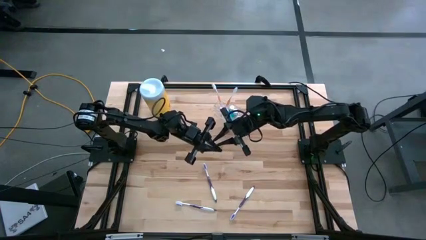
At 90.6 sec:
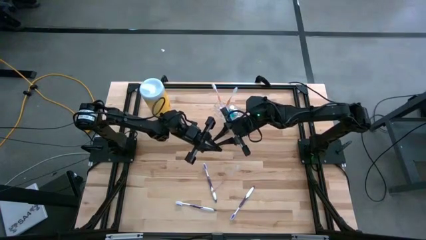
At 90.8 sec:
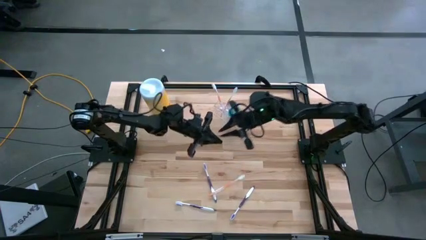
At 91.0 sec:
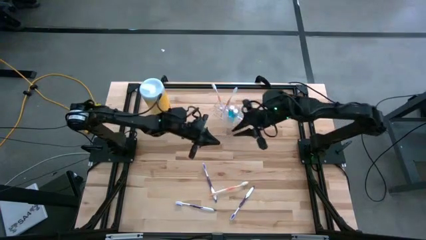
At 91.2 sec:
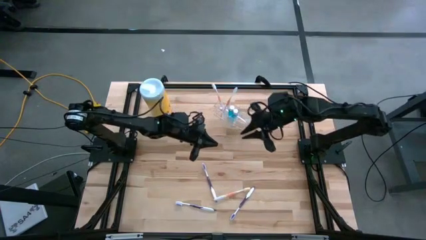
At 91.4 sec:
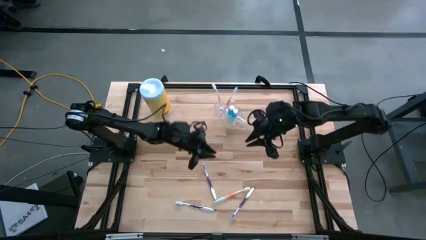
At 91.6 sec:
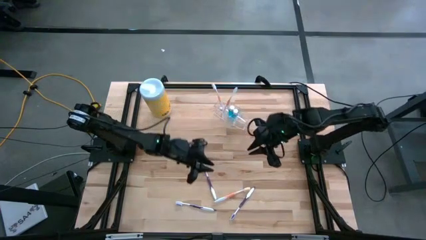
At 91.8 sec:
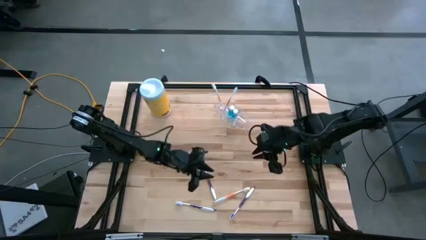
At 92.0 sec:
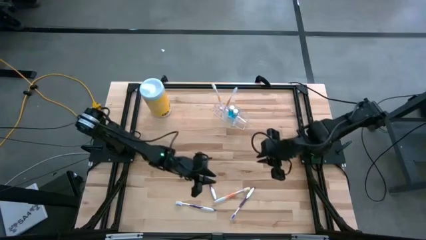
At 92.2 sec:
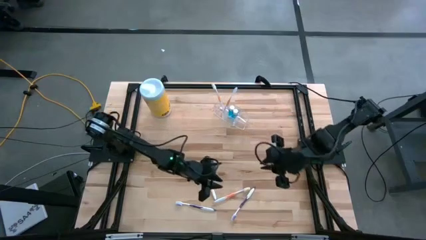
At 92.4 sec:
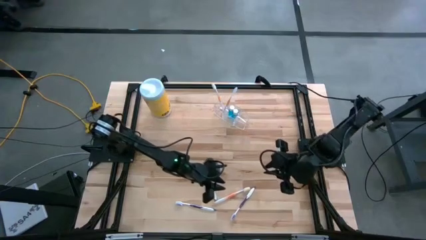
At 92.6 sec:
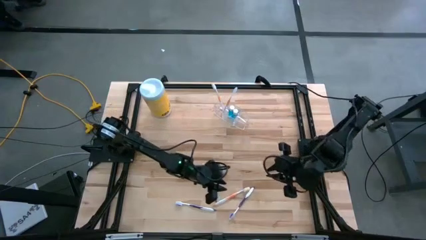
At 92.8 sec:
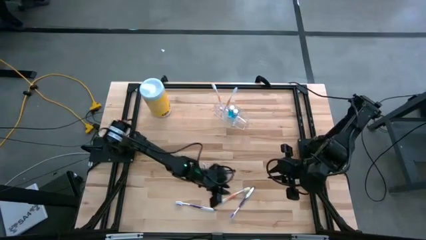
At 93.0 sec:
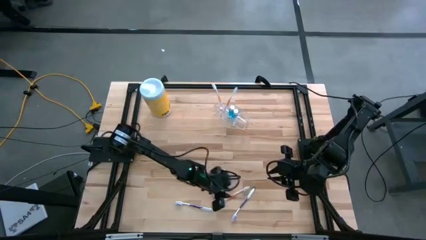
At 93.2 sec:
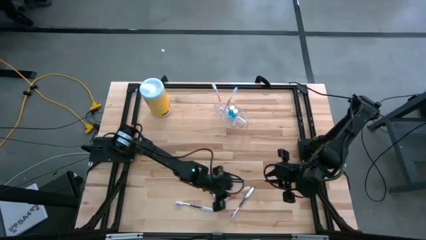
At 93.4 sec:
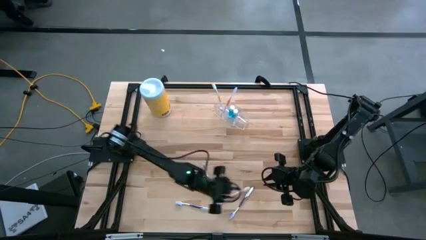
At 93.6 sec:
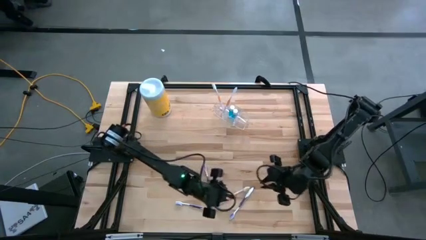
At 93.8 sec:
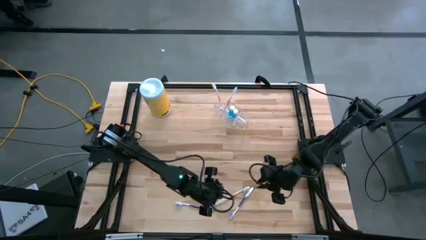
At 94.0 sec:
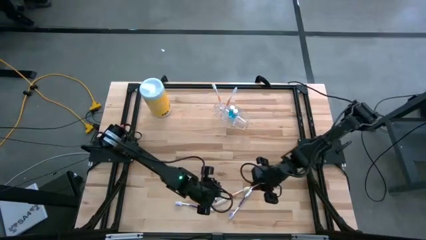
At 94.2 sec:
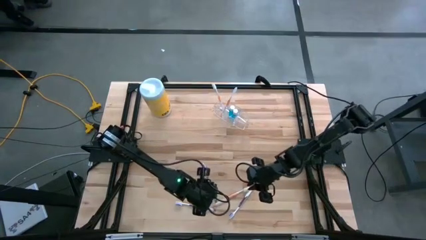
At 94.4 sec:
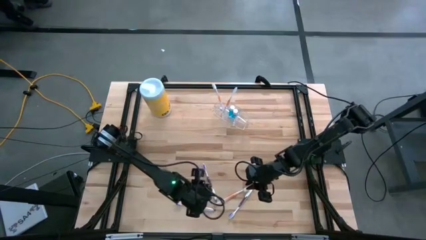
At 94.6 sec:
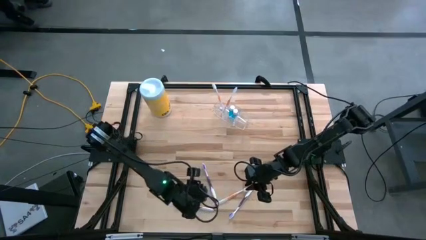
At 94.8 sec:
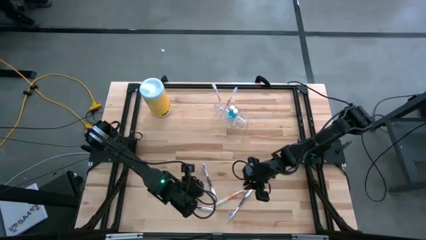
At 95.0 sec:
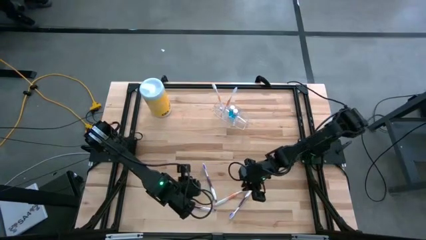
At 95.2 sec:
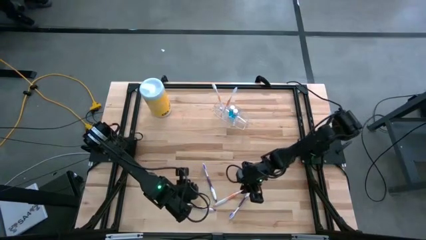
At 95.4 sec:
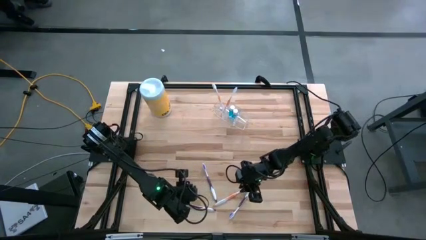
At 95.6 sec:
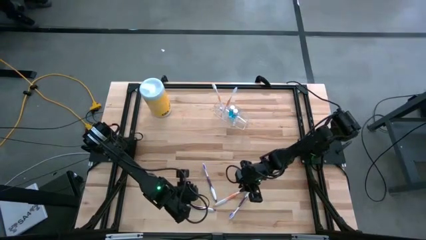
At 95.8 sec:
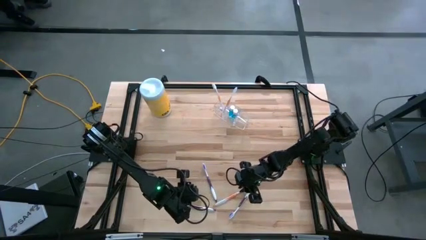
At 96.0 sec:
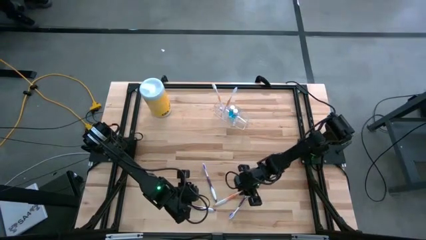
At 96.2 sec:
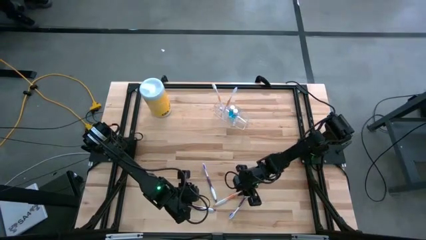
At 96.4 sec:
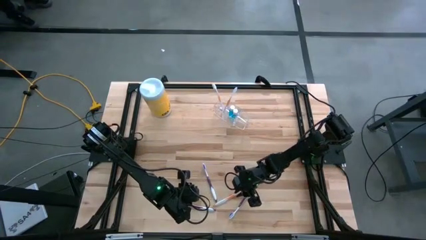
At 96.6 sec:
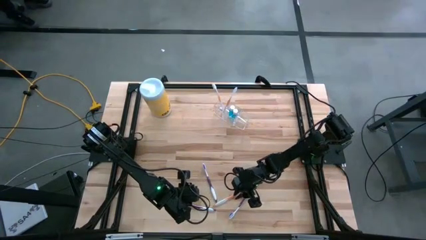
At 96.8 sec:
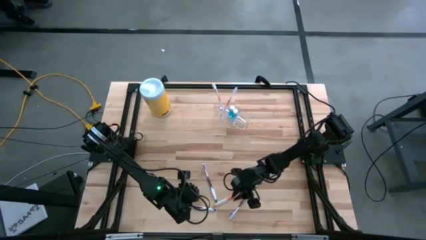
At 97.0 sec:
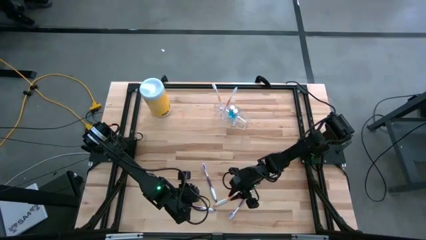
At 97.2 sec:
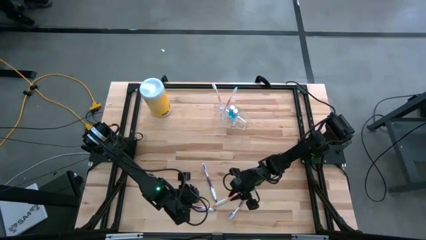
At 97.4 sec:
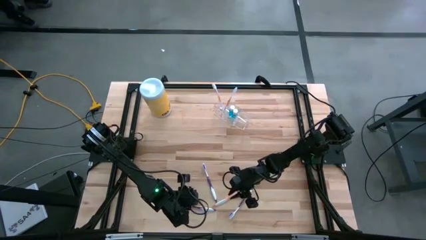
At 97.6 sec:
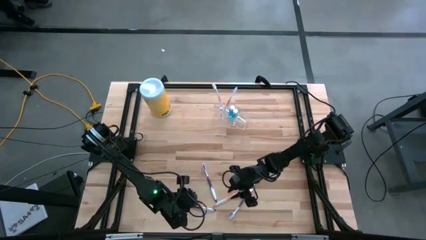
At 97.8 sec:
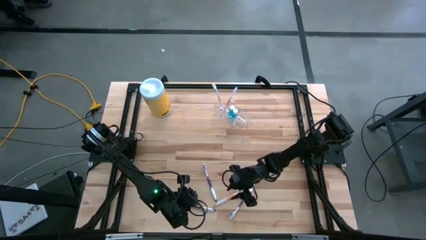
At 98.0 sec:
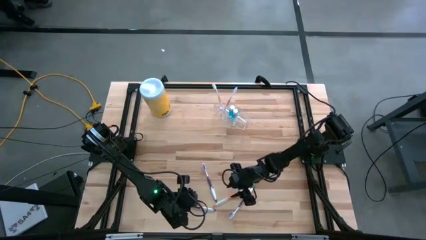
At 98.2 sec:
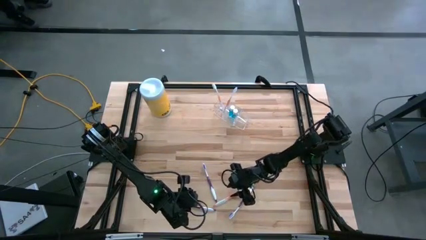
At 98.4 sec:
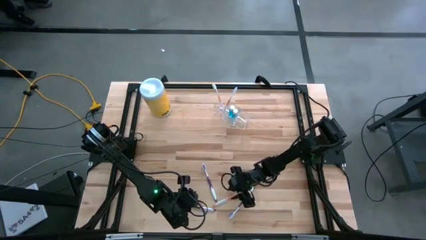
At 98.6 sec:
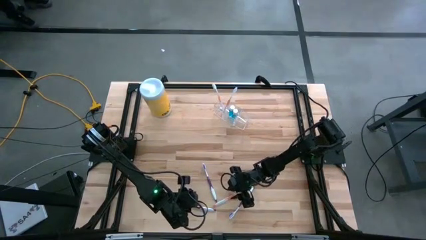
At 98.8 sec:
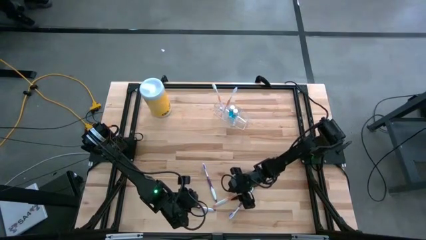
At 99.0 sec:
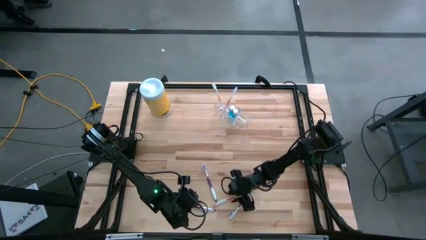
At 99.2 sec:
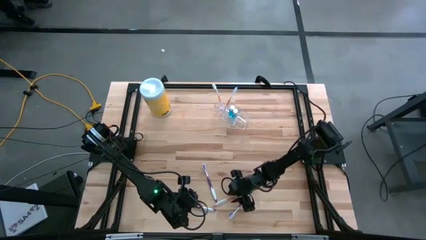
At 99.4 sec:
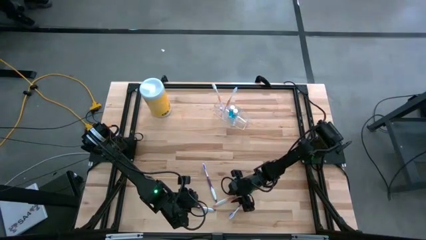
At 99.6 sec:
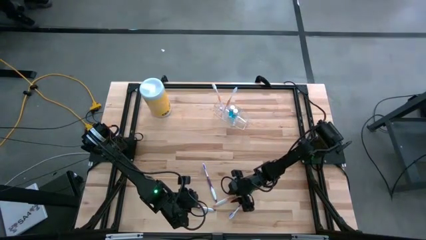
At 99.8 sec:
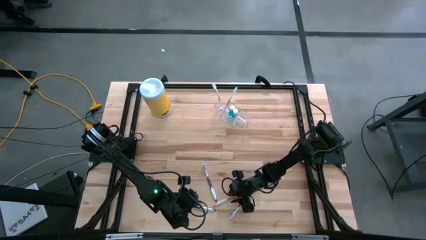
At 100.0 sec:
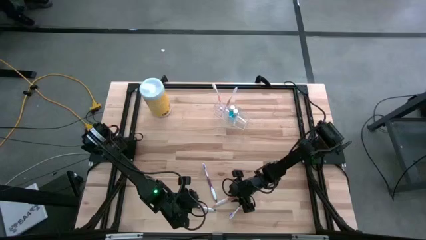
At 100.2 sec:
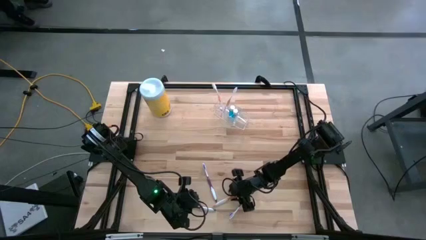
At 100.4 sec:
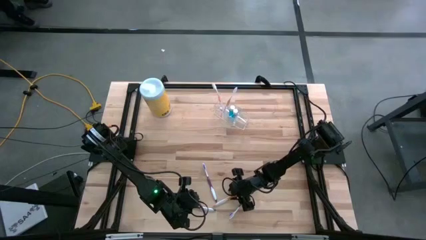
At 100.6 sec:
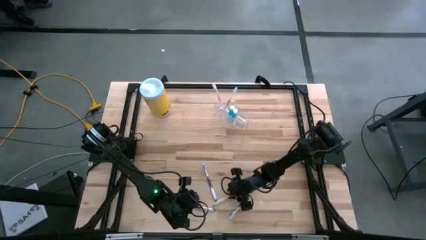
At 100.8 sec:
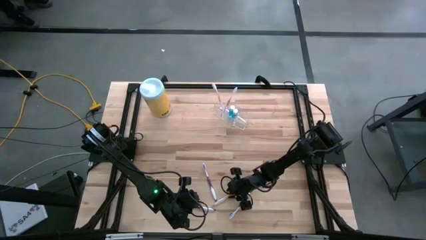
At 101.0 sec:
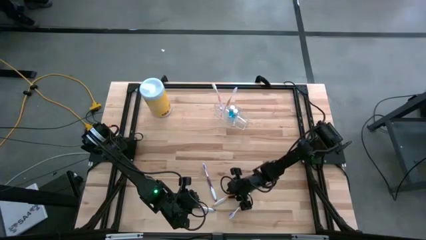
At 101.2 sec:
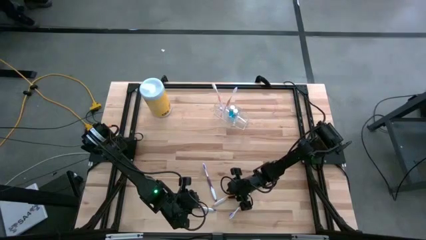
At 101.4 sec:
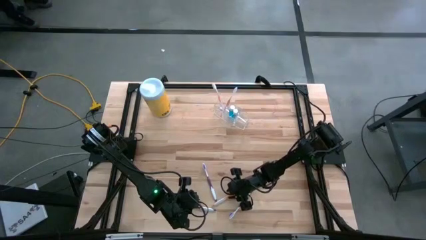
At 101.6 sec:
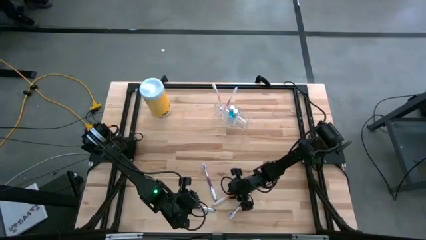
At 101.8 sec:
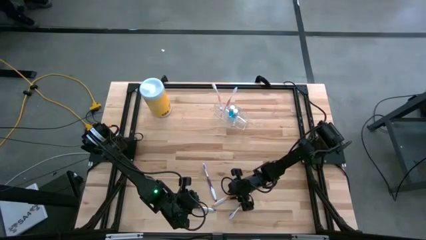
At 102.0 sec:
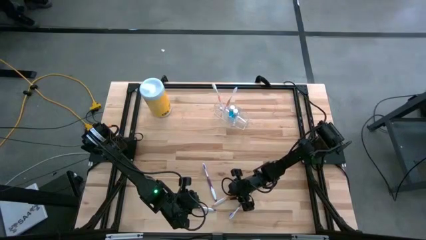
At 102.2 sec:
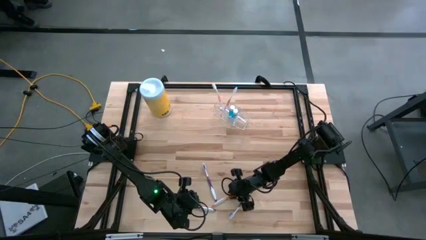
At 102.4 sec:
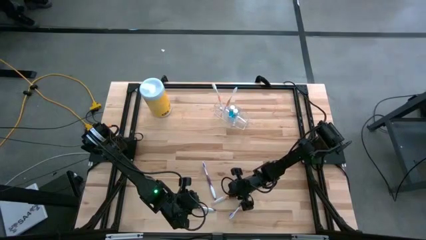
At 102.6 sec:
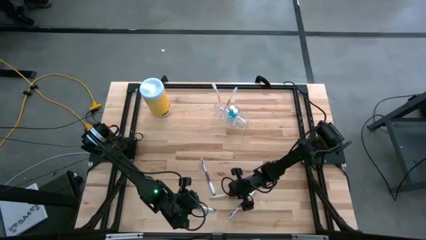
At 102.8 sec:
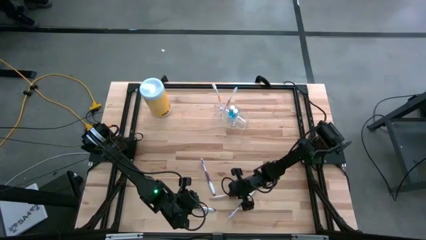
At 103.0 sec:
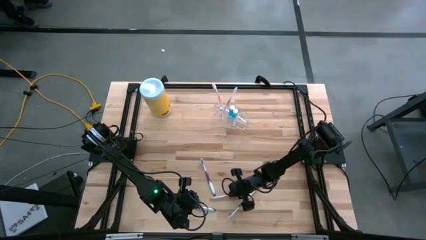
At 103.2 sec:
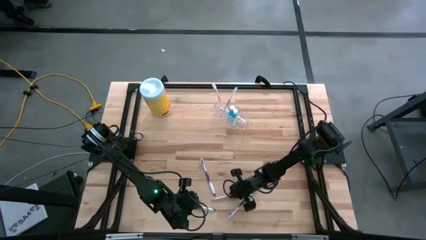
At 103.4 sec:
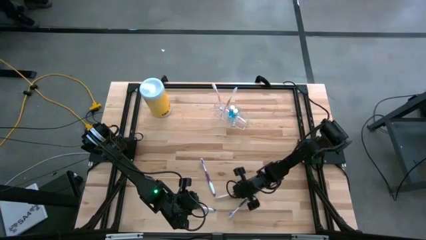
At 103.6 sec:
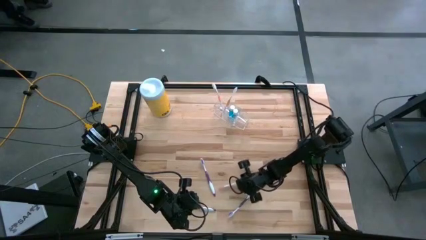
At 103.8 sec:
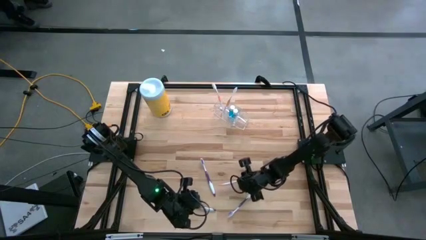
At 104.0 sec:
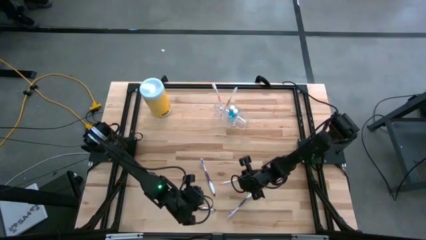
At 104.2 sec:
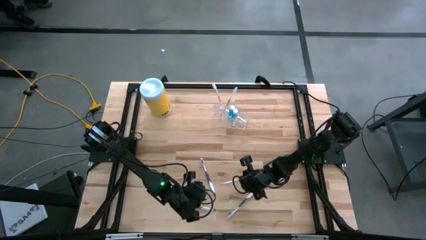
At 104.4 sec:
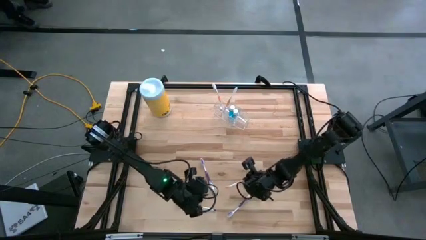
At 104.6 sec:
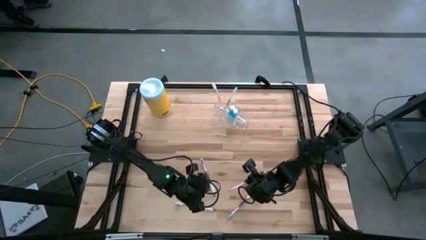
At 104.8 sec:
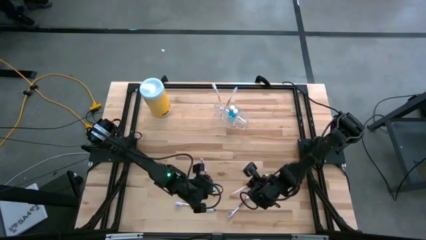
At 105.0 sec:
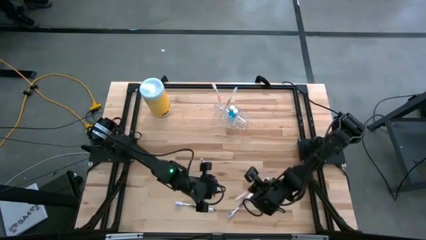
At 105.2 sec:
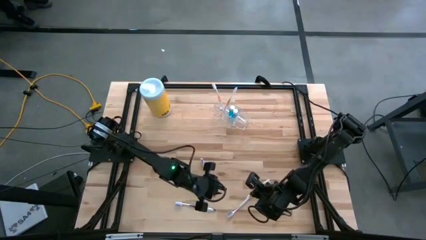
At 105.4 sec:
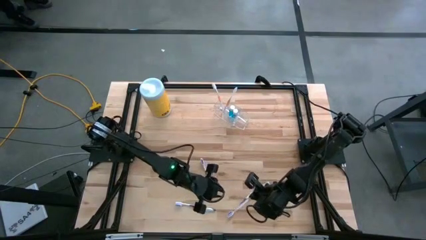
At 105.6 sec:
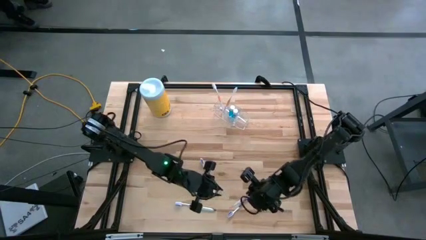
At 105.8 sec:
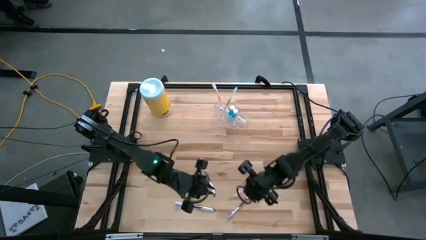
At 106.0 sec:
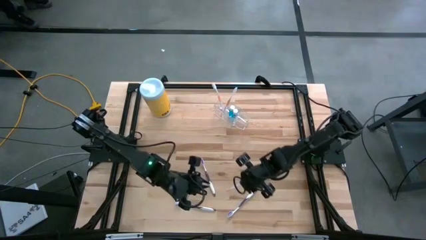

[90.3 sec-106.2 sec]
Task: Pick & Place toothbrushing station
Put the orange toothbrush into the transparent organizer
